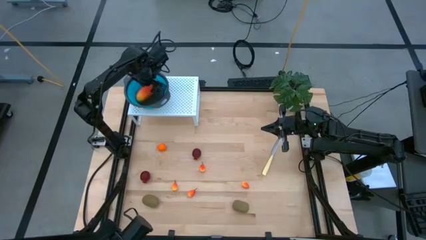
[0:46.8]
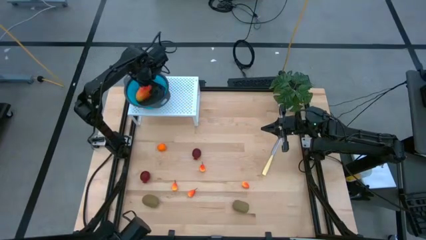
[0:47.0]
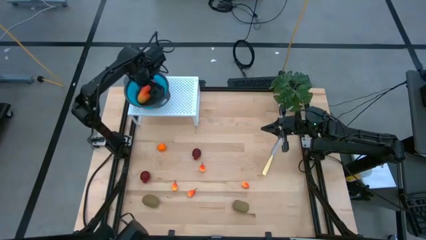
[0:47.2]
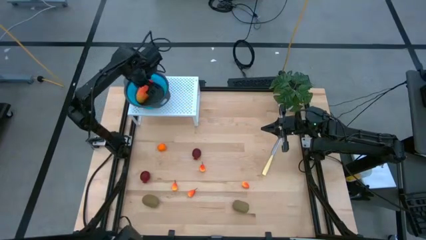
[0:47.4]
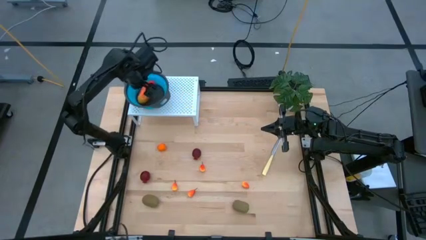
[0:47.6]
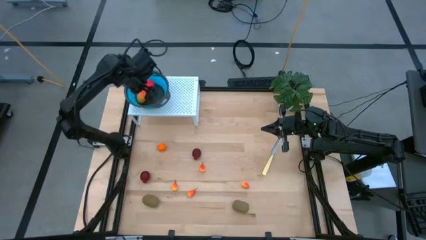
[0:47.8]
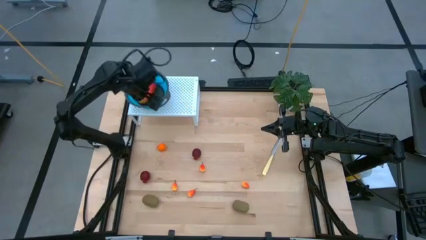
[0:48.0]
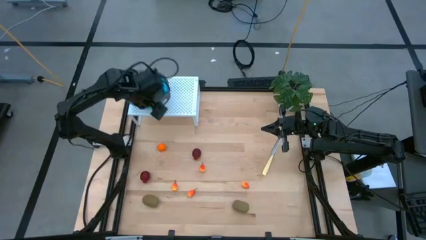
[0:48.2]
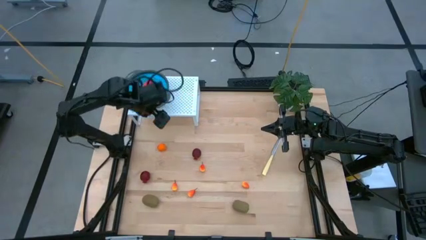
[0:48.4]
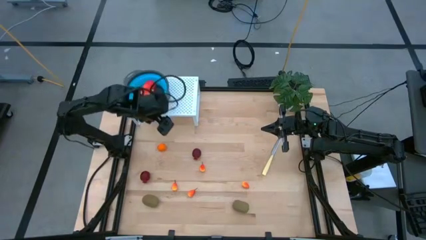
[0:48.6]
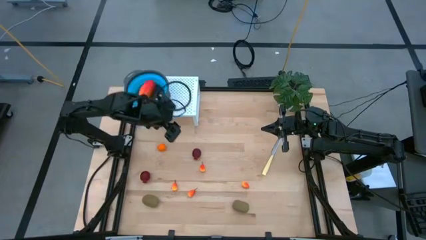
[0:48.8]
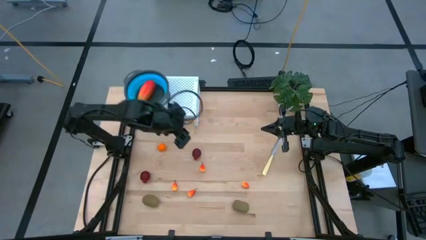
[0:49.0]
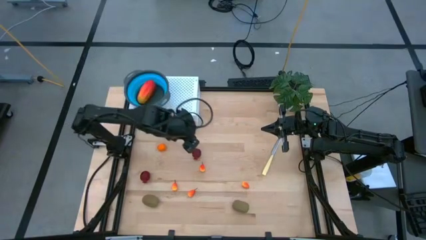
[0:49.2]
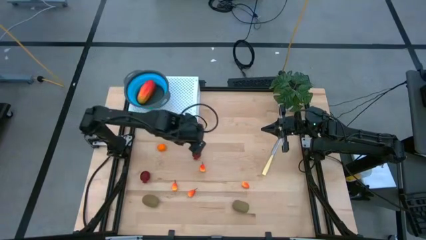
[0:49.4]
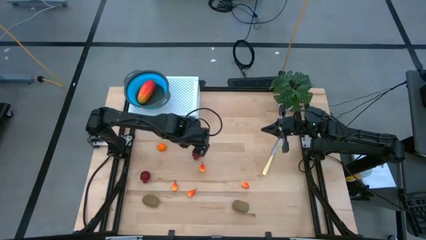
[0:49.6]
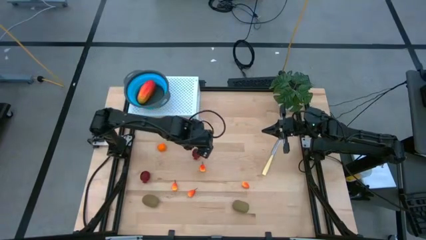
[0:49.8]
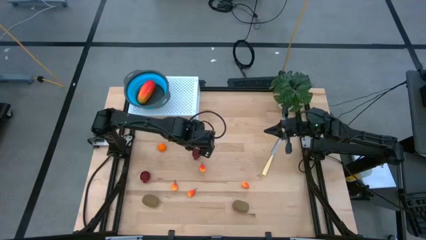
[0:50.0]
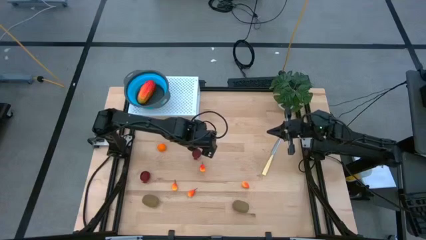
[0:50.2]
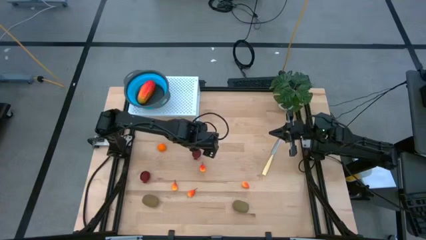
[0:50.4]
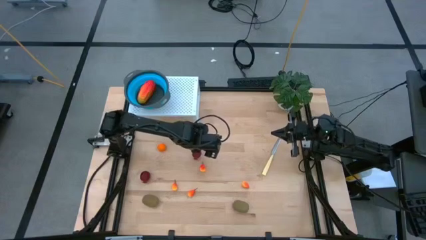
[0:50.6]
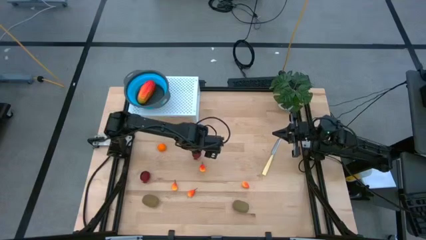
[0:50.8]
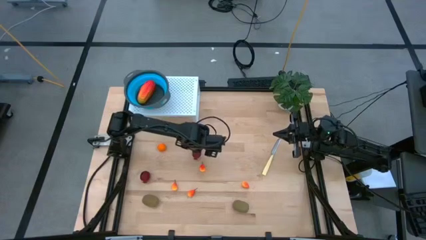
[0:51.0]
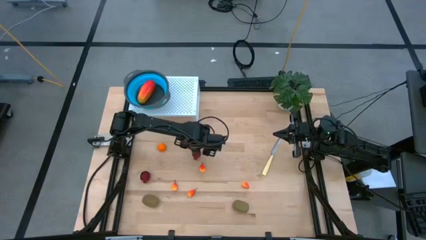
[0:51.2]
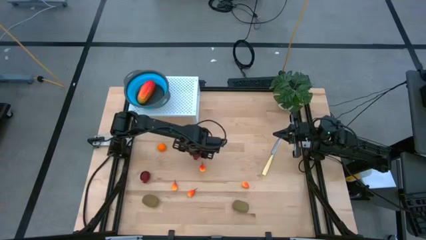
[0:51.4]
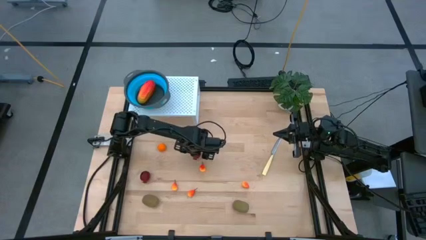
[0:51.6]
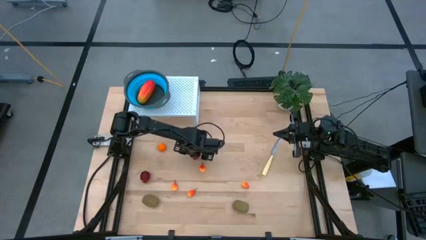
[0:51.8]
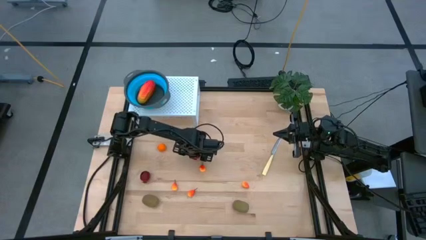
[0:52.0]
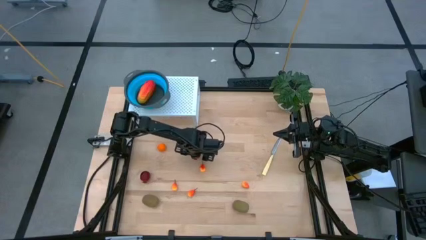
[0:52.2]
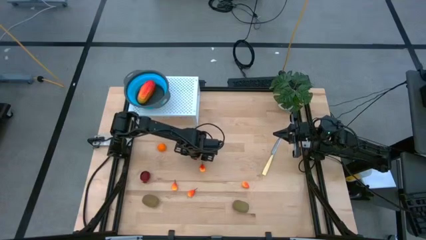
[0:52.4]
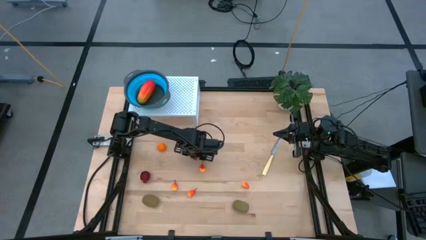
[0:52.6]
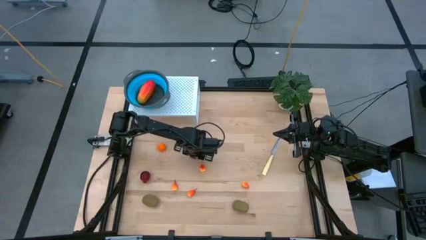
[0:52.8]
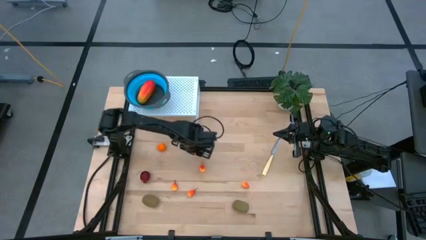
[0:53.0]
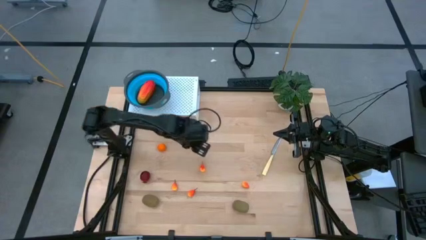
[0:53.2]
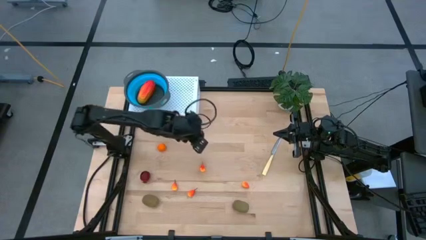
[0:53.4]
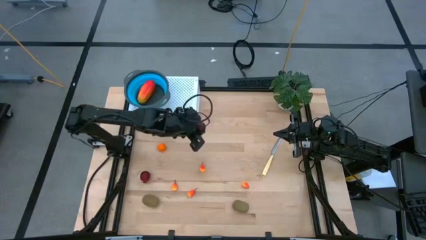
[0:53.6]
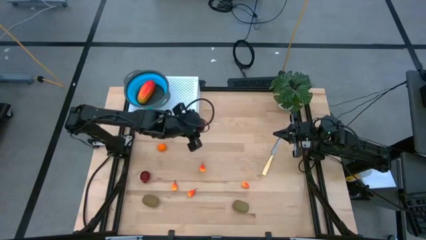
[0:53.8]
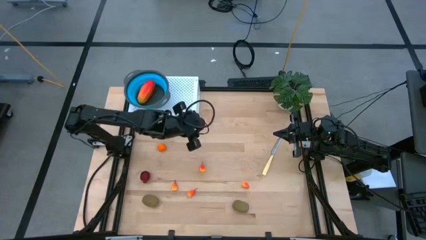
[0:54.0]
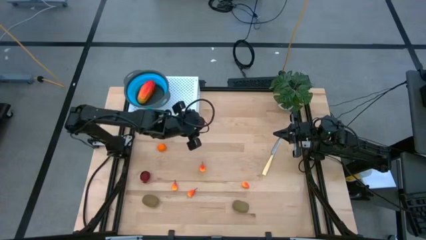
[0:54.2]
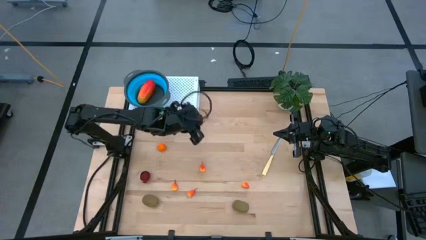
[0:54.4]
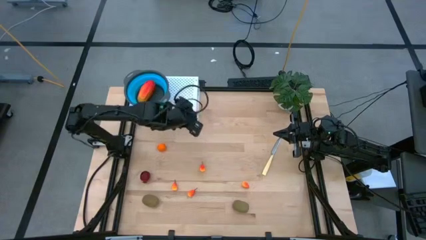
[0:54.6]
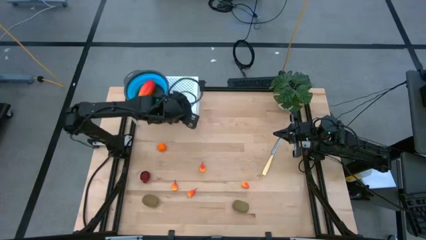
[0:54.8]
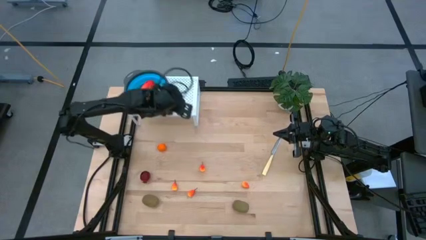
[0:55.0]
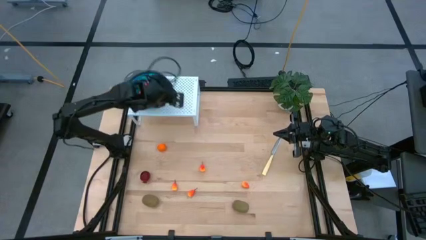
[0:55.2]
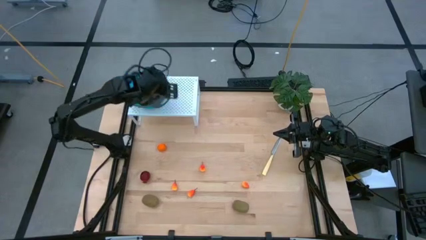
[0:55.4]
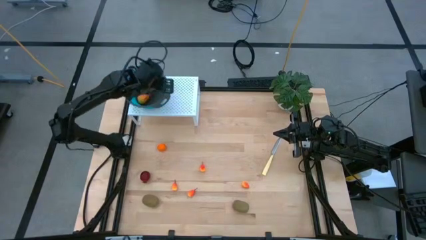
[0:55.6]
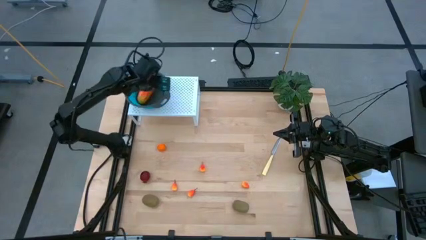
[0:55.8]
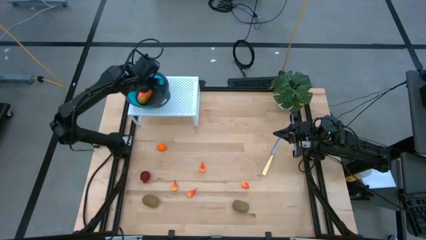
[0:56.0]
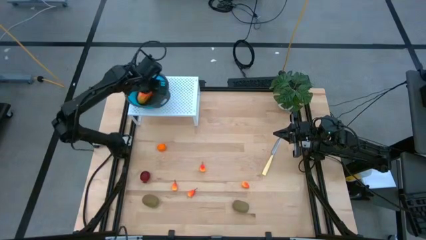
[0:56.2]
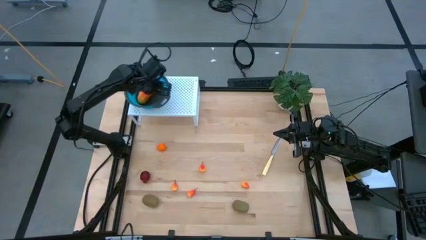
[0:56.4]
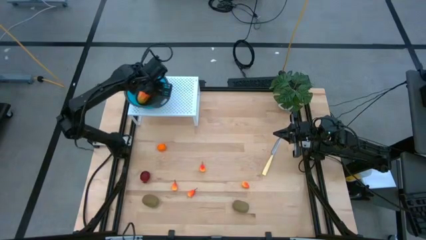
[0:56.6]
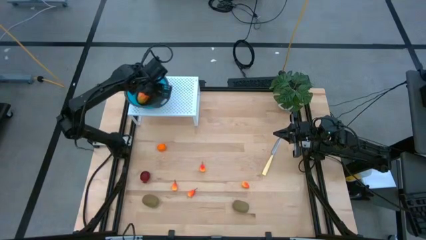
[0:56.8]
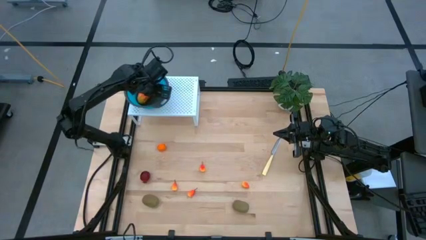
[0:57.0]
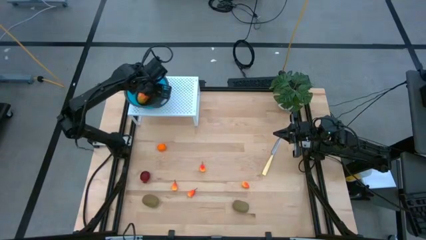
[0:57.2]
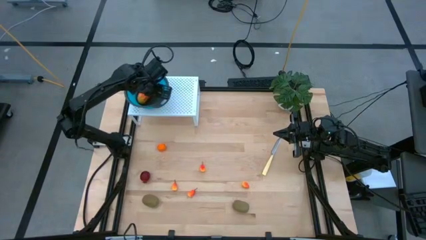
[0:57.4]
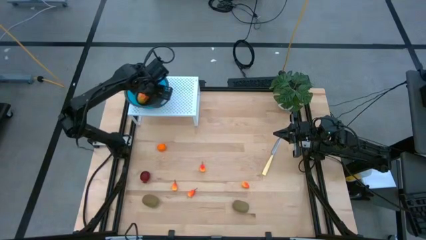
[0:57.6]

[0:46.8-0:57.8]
Task: Pick & Place Fruit
Put the top pomegranate into the blue strainer bowl on the shelf

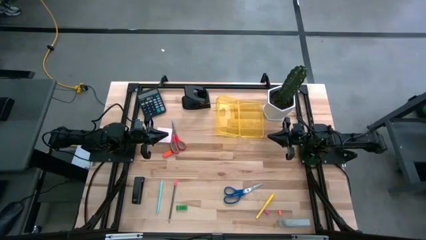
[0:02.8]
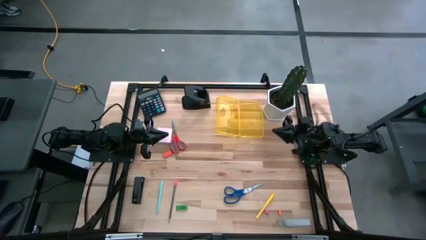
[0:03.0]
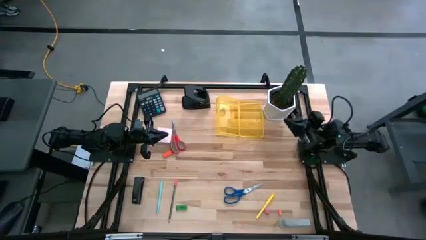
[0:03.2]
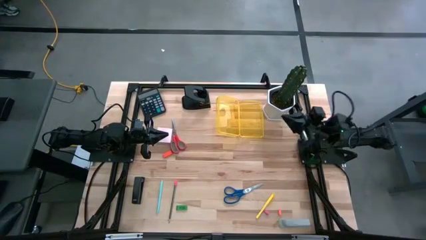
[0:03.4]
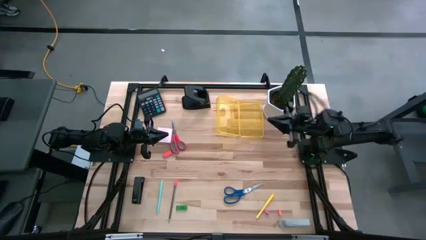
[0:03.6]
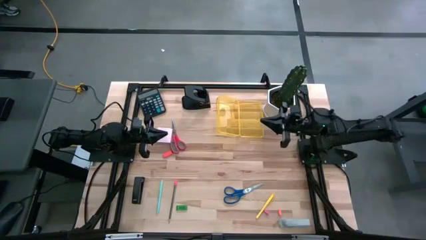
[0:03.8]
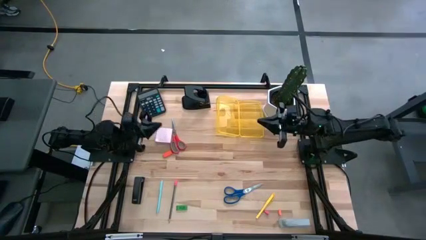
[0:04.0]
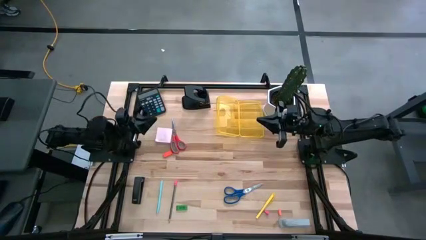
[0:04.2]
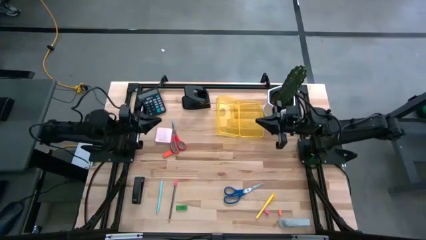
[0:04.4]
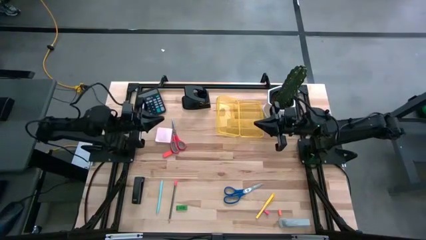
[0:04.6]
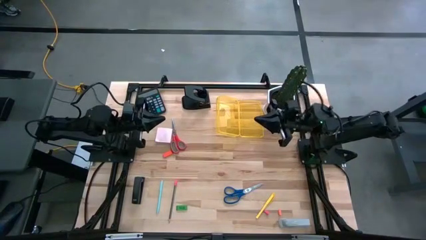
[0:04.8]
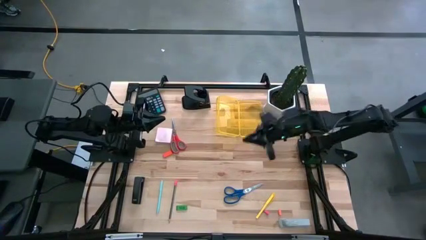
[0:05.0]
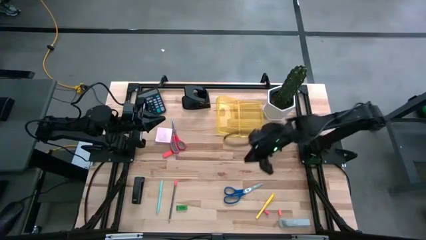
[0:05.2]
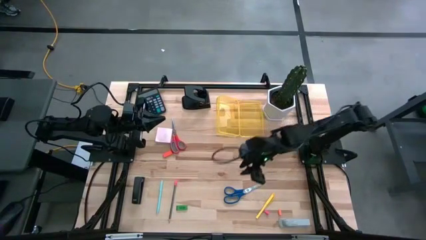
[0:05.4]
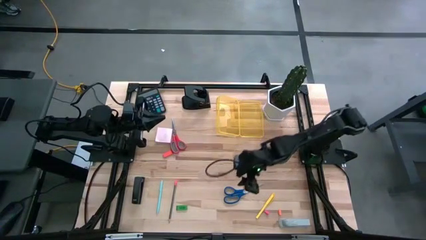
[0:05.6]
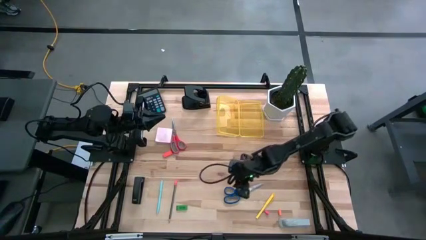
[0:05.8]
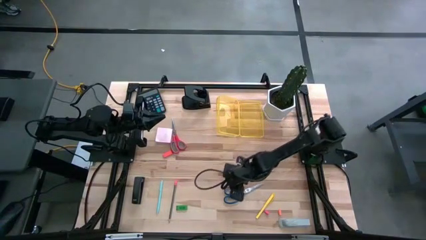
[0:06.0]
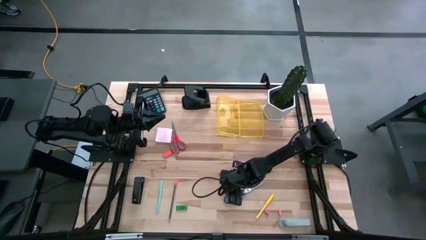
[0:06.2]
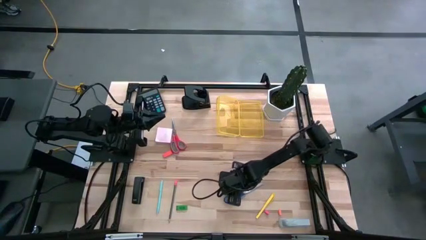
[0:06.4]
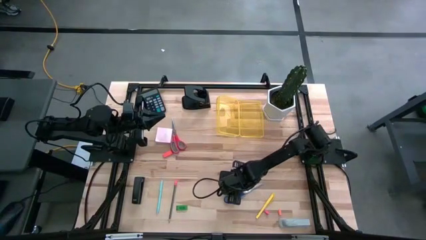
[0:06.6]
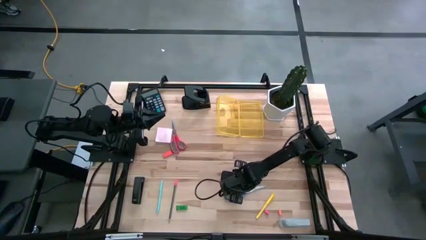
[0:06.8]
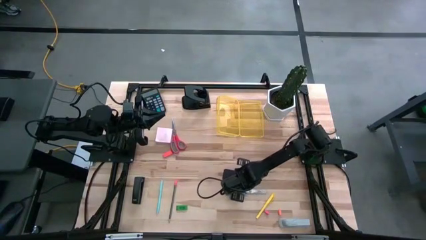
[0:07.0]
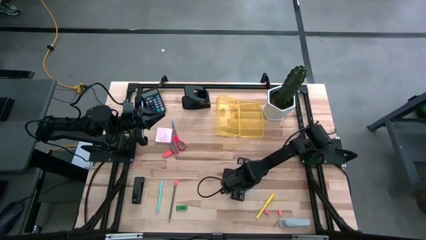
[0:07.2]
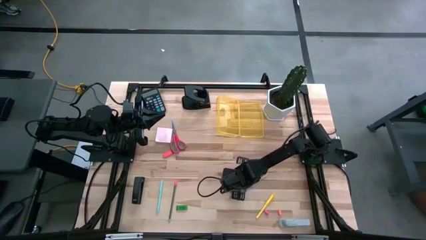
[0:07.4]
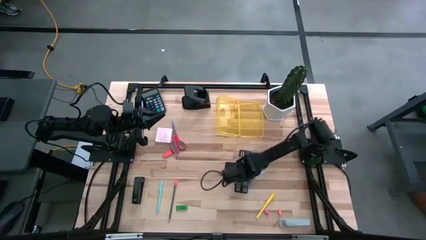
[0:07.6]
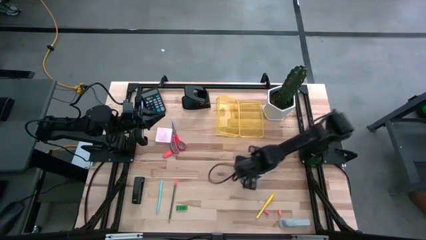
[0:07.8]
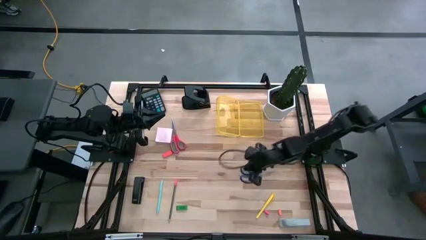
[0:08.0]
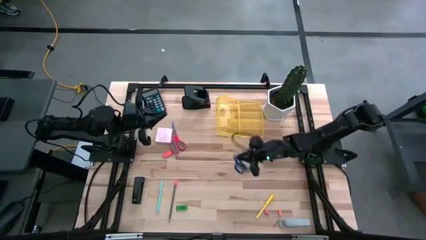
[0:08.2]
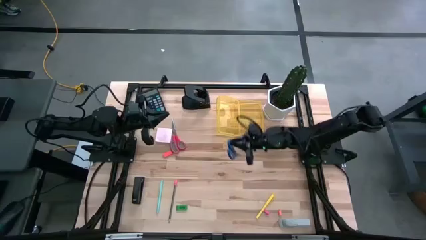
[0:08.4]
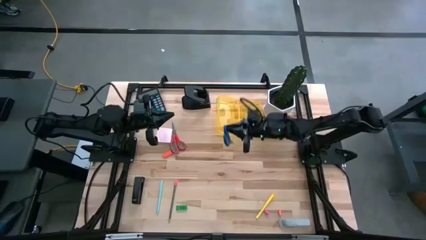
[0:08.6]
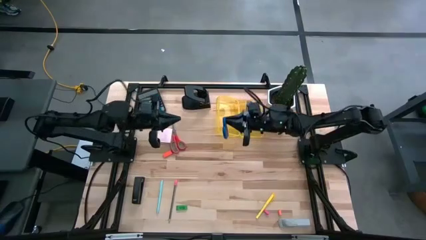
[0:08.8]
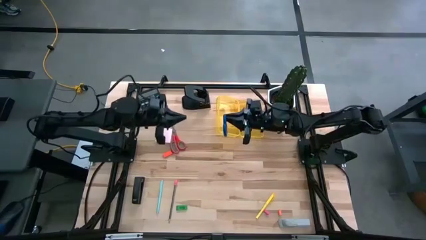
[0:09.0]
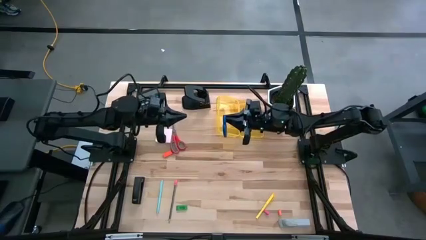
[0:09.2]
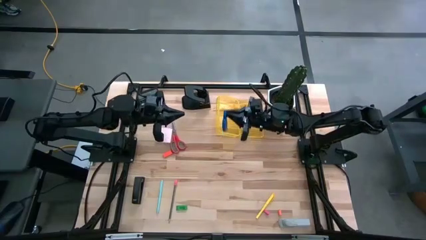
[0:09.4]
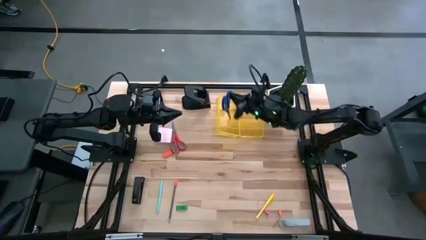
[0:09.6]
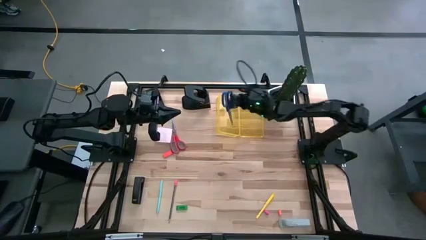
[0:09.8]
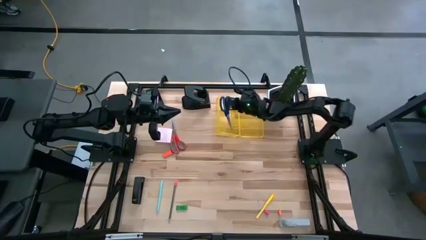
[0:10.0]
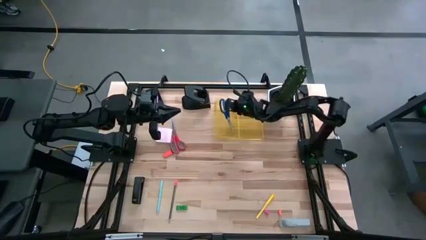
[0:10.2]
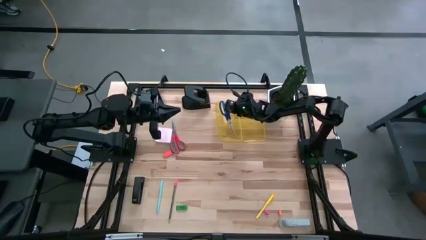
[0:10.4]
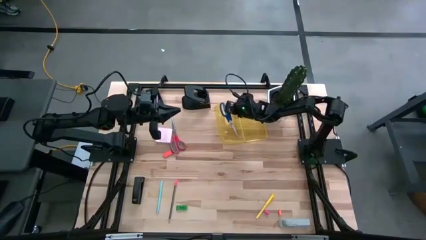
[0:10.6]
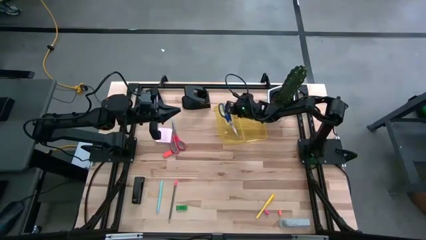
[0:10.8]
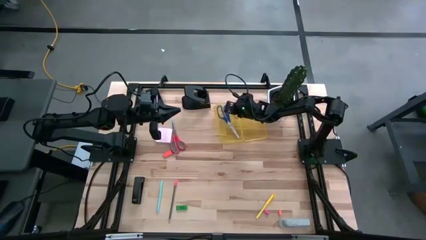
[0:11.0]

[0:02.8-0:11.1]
Task: Pack school essentials
Put the blue scissors into the yellow supply box
